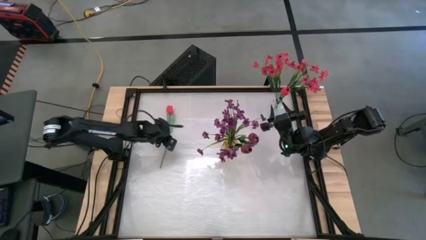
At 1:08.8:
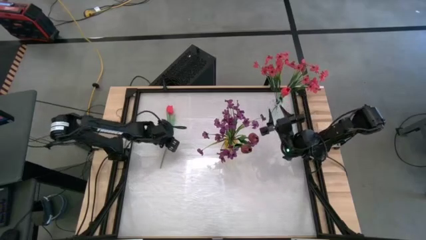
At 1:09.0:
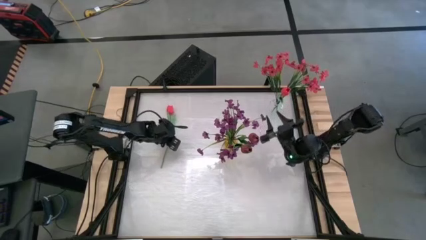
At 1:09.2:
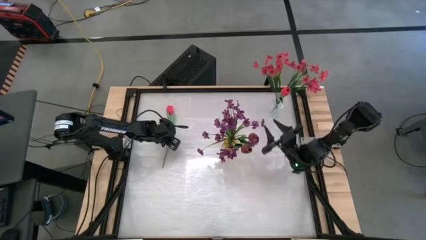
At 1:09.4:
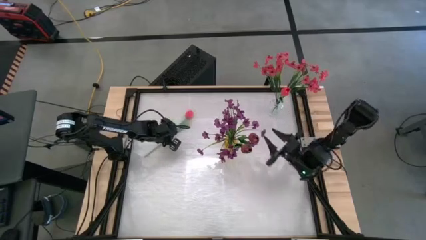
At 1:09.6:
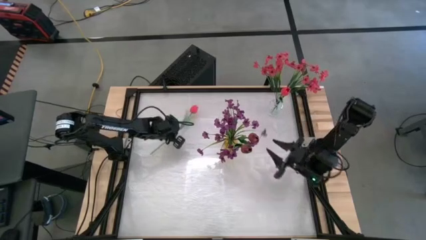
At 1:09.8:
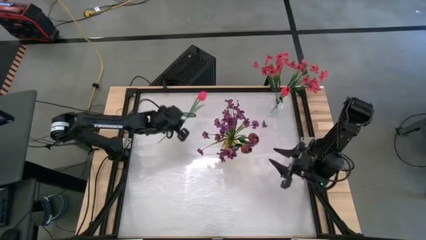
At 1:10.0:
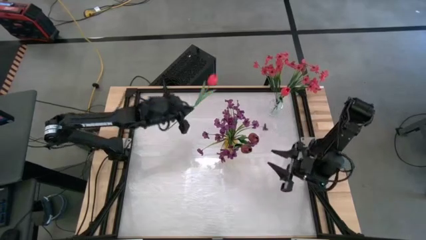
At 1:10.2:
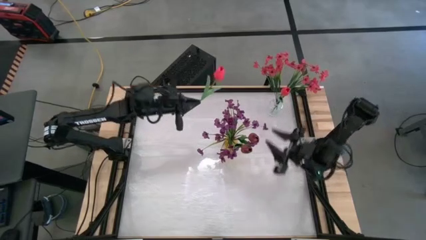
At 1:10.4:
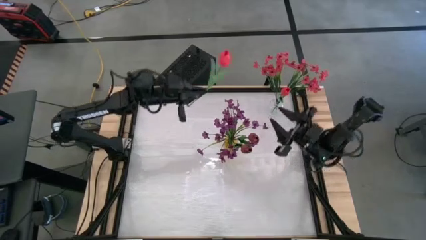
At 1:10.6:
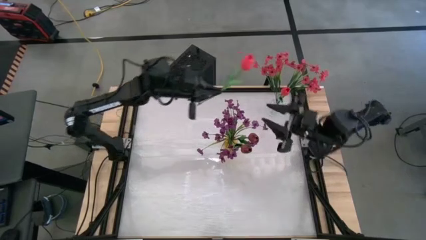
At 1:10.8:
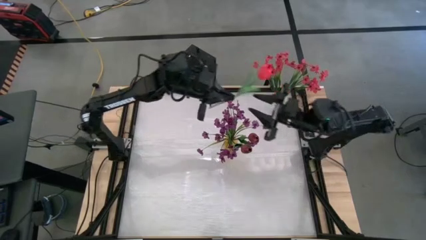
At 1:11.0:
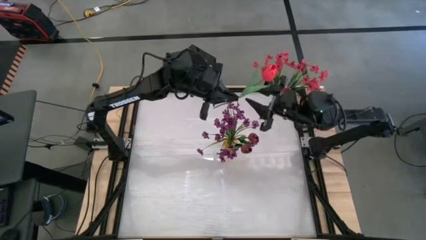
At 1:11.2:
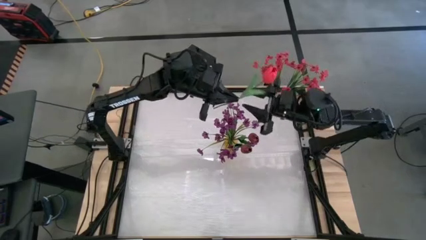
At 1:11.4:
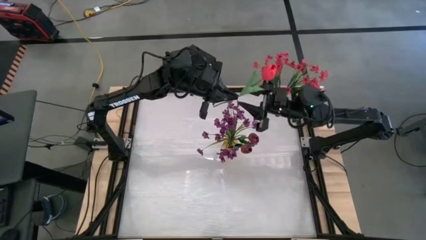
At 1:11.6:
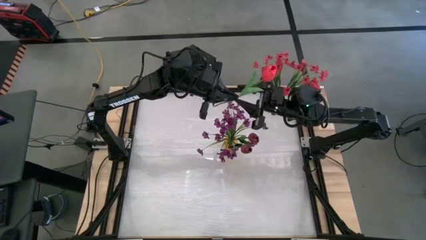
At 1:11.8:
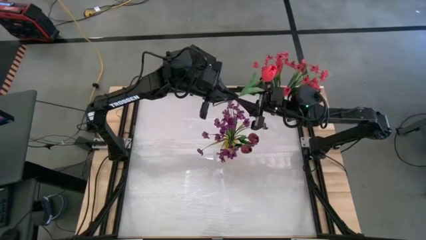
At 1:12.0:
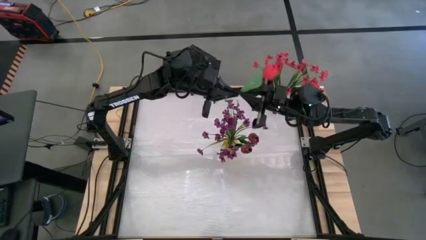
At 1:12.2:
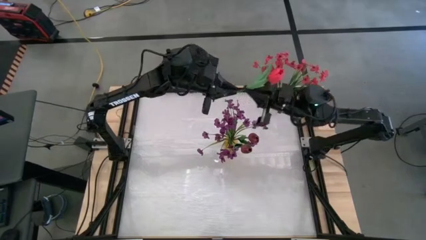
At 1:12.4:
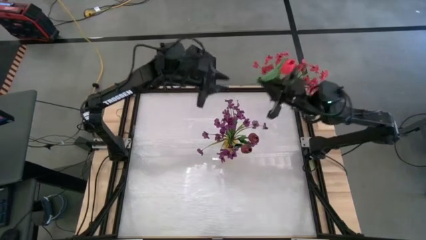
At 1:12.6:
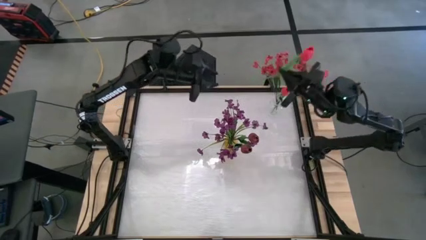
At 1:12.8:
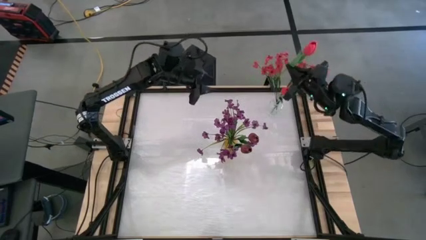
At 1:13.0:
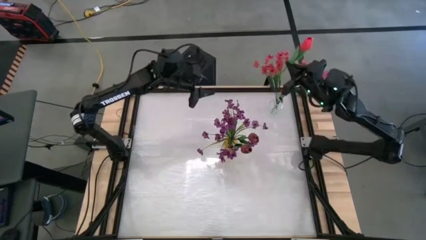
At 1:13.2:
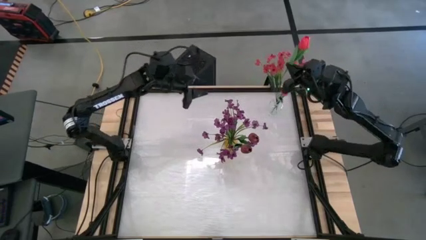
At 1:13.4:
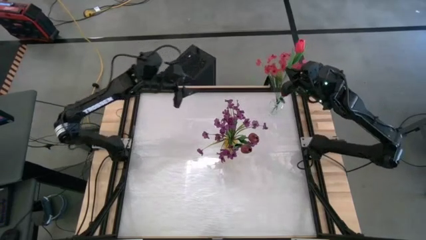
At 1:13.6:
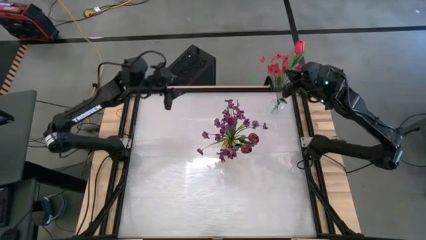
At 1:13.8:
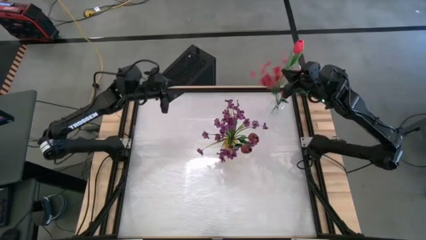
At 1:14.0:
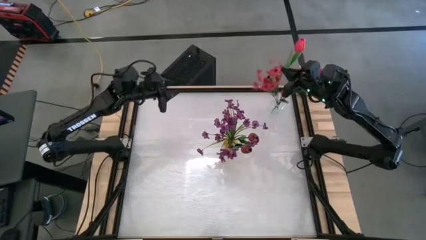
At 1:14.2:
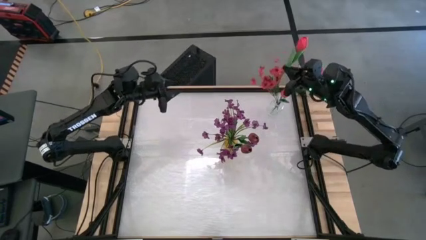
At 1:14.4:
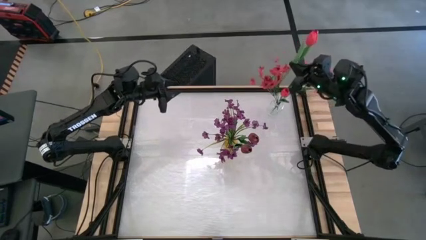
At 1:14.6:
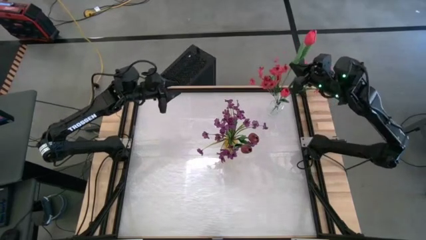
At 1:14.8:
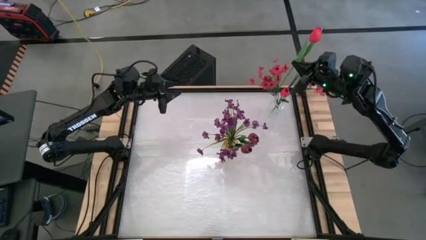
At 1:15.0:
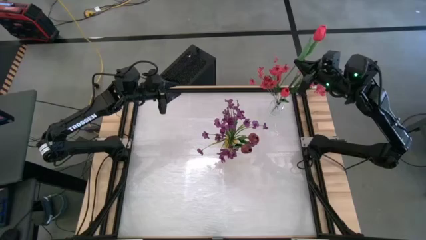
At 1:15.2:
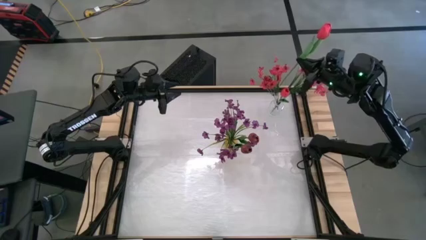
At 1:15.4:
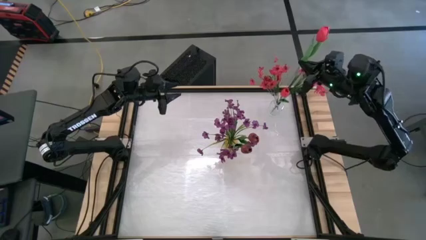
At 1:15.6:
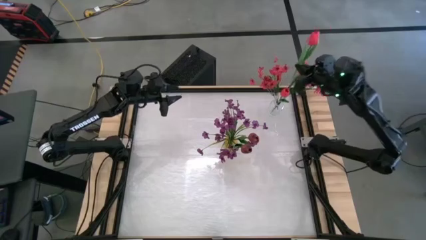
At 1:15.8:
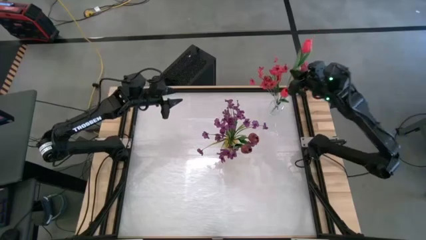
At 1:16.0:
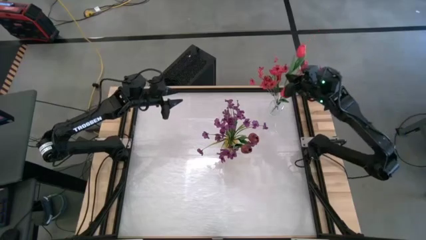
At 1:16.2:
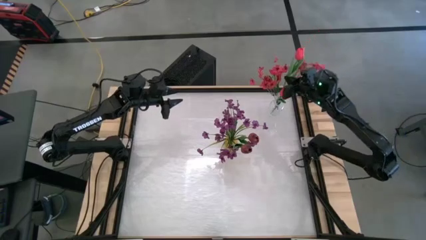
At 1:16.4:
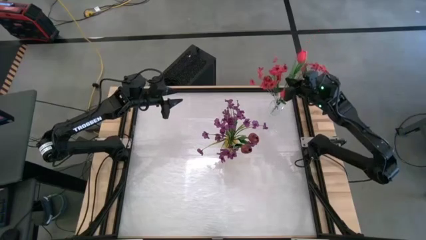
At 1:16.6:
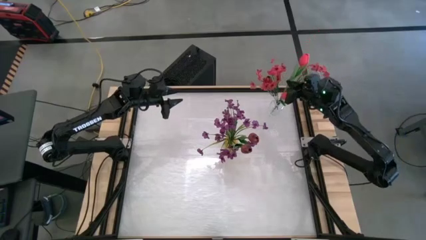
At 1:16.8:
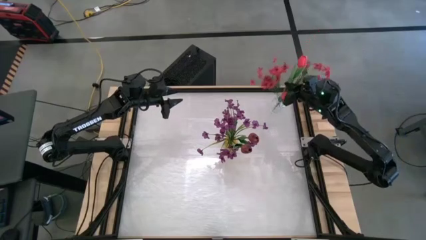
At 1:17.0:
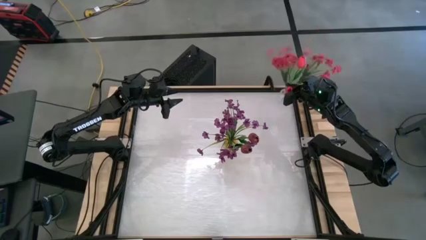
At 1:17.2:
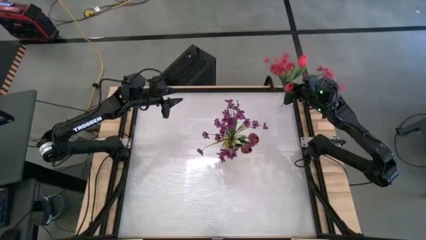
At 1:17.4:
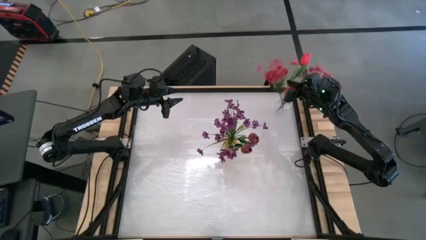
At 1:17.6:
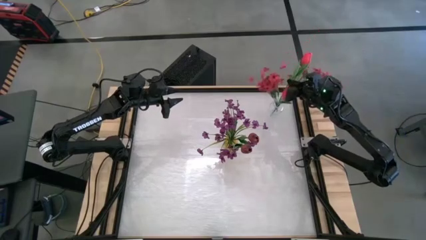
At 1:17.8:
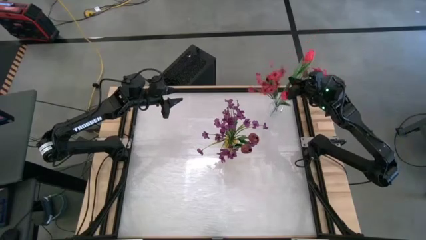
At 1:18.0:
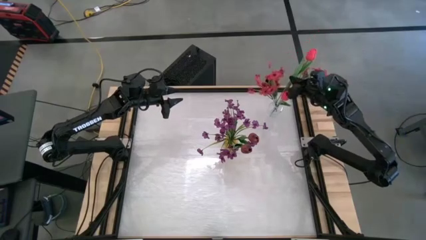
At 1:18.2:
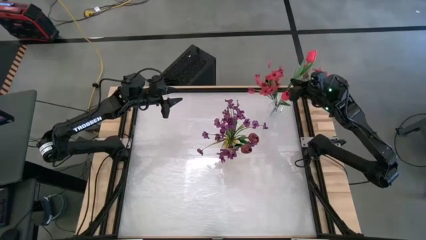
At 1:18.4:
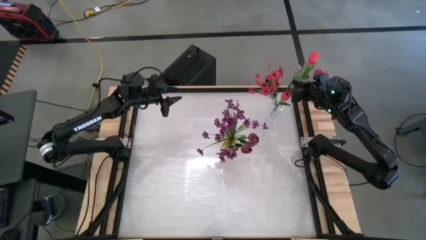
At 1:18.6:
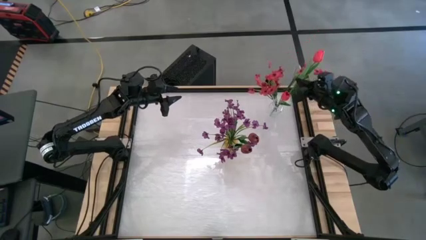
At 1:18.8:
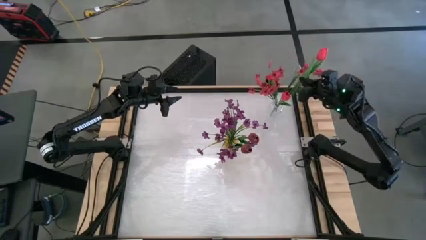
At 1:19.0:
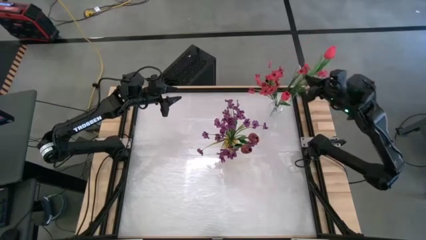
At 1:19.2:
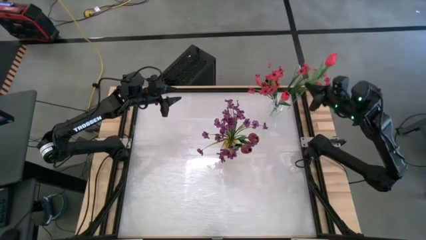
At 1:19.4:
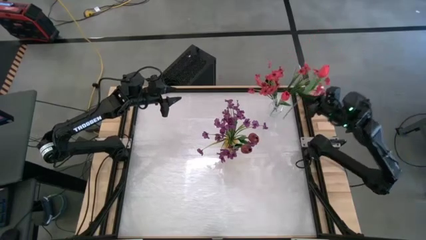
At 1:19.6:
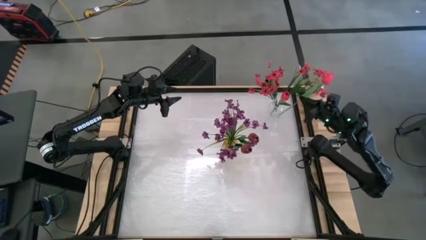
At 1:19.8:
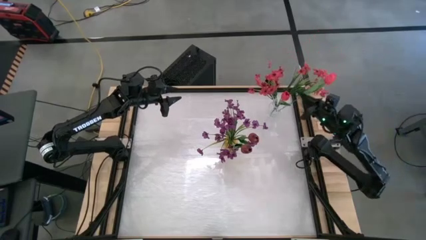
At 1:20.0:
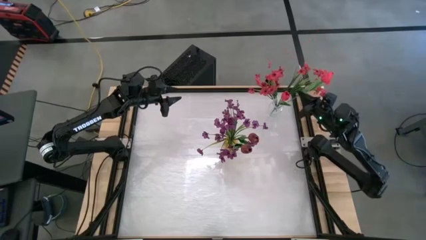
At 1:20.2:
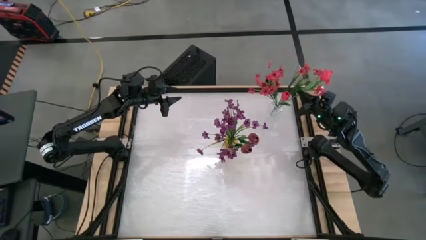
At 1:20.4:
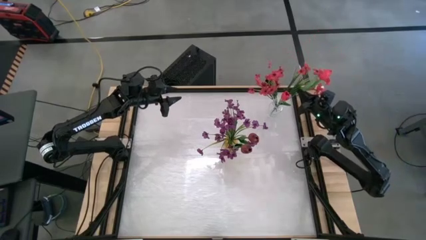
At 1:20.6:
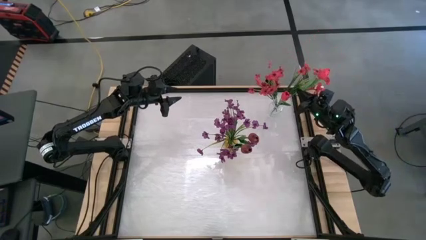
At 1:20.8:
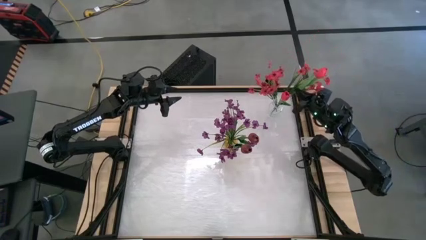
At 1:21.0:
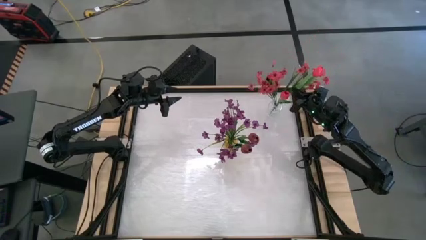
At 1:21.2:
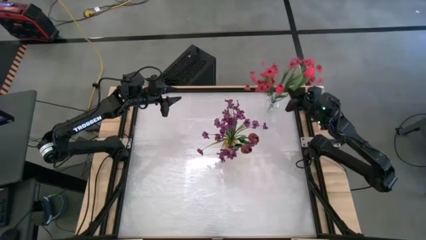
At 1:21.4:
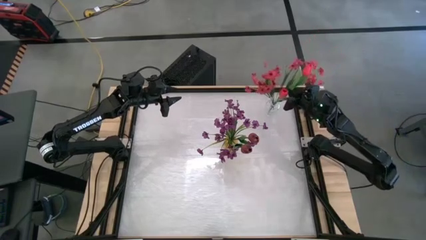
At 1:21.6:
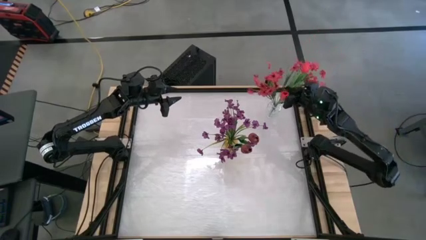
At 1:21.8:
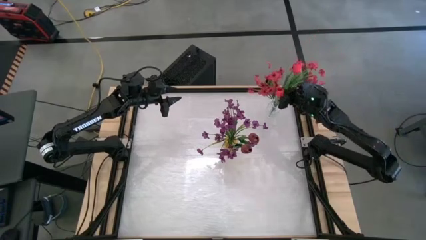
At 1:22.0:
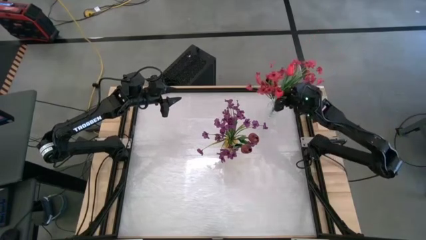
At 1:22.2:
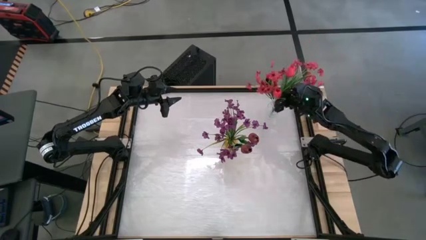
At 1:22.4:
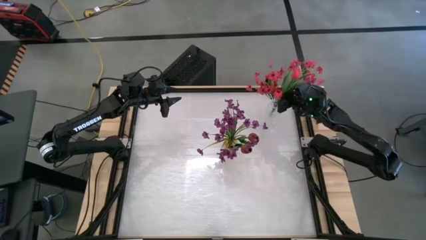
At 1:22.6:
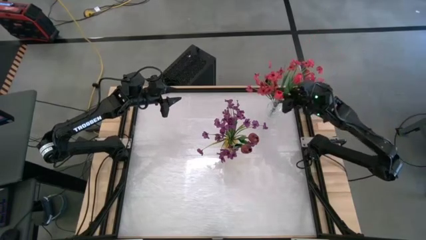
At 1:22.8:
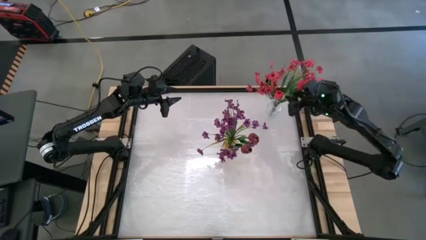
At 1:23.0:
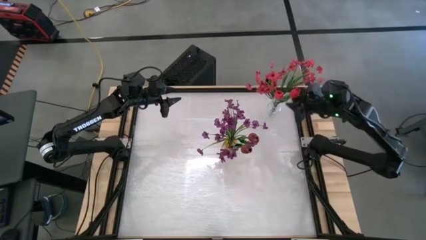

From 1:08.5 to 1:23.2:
Task: Sort flowers into vase by color
Put the pink tulip into the transparent vase
